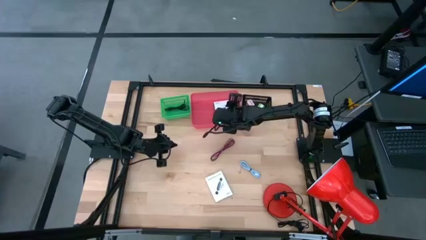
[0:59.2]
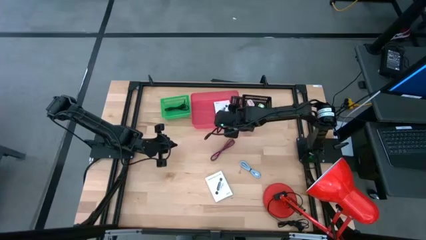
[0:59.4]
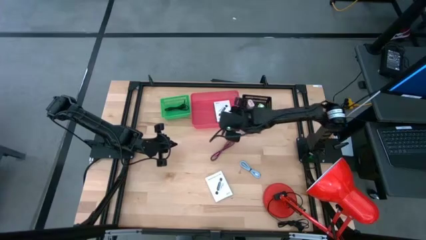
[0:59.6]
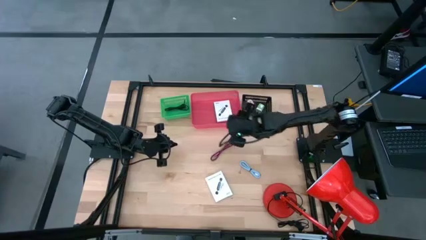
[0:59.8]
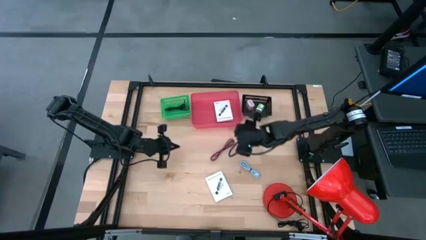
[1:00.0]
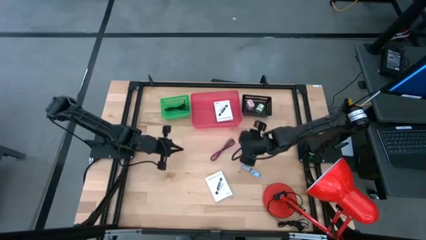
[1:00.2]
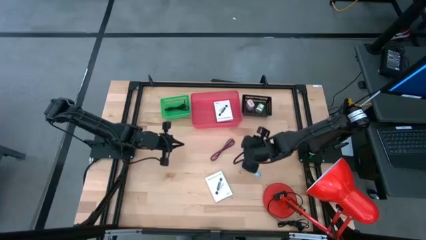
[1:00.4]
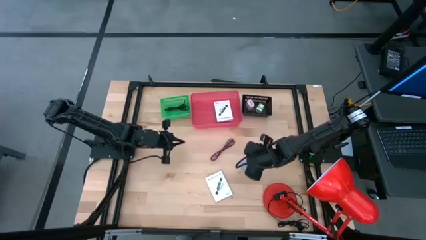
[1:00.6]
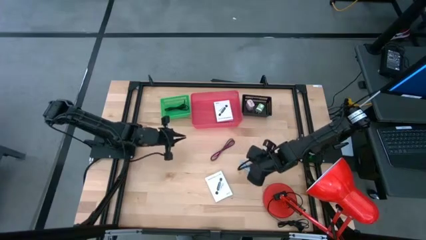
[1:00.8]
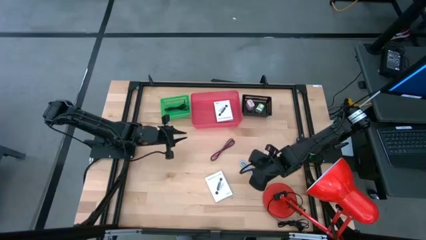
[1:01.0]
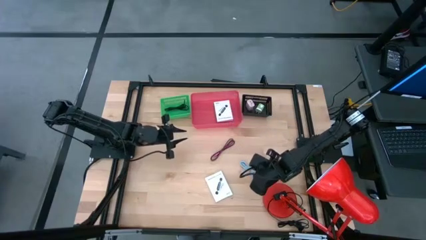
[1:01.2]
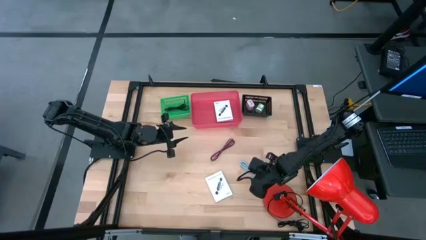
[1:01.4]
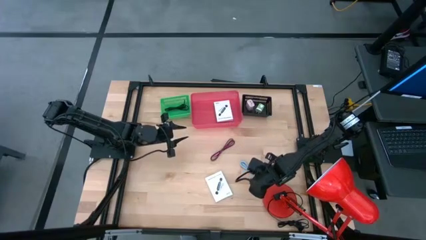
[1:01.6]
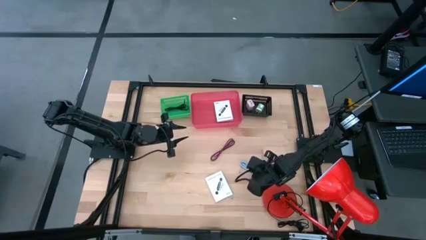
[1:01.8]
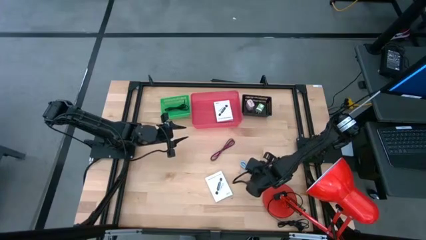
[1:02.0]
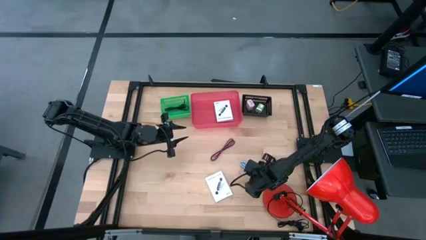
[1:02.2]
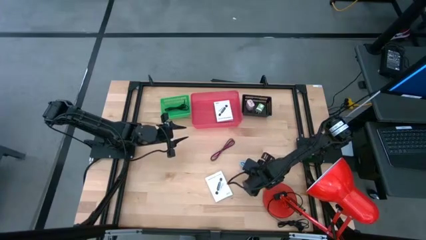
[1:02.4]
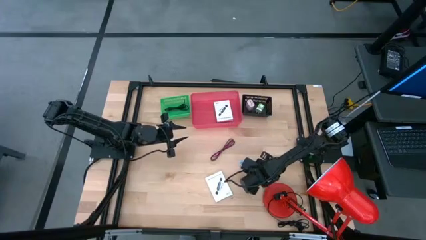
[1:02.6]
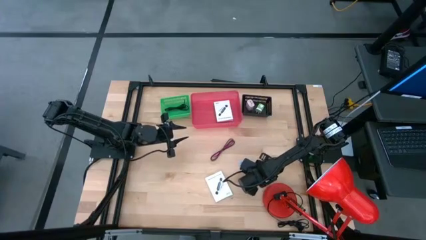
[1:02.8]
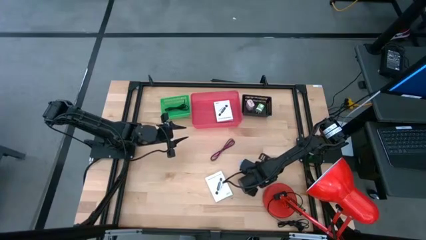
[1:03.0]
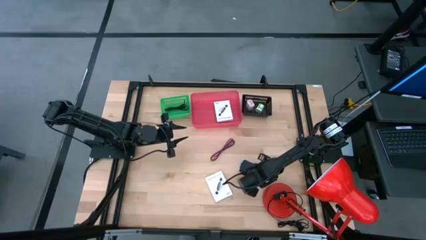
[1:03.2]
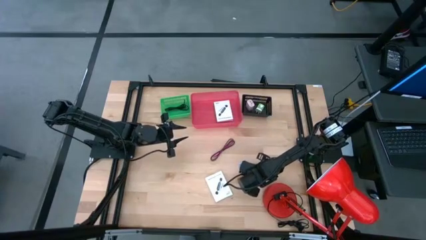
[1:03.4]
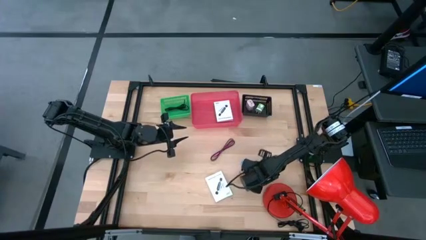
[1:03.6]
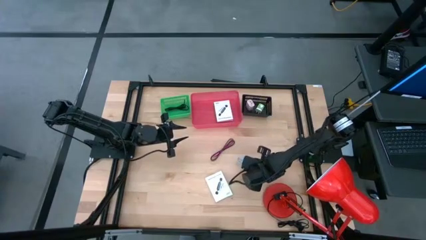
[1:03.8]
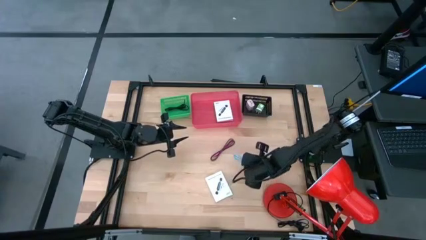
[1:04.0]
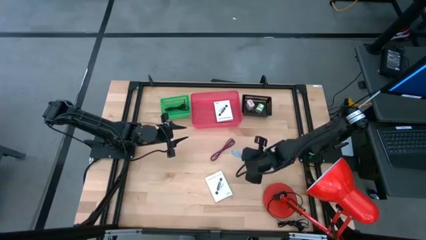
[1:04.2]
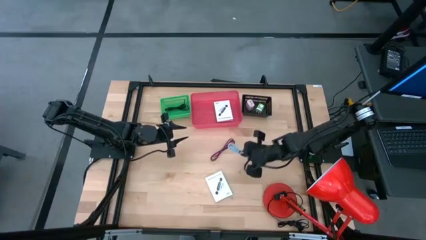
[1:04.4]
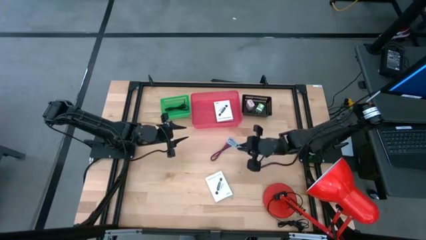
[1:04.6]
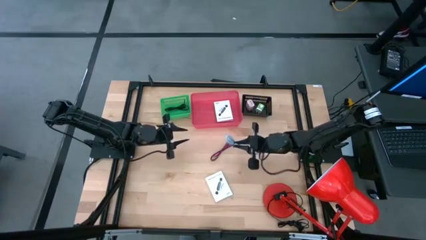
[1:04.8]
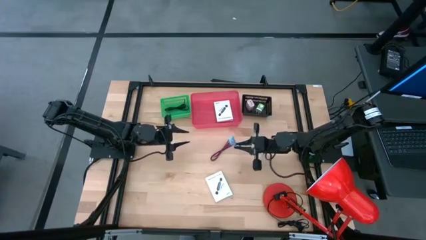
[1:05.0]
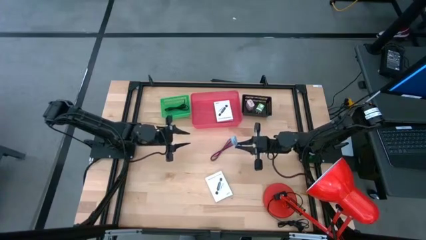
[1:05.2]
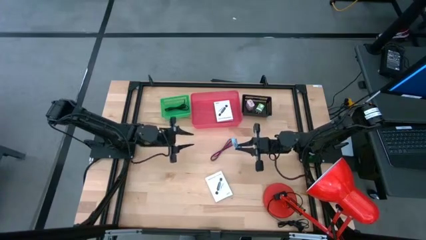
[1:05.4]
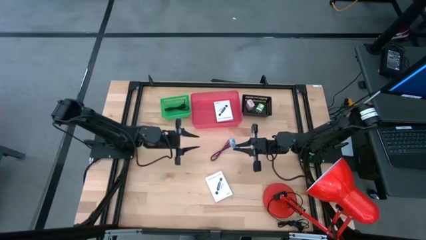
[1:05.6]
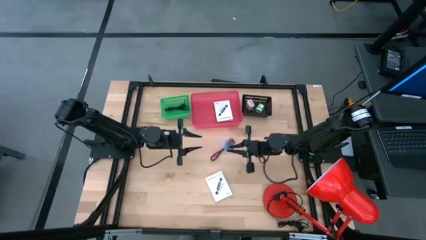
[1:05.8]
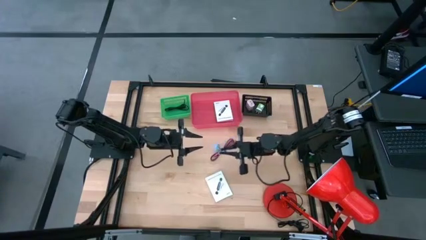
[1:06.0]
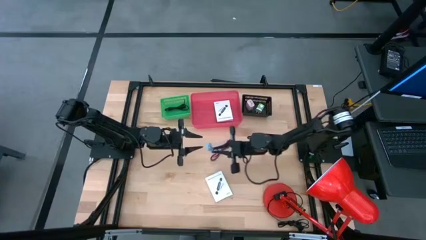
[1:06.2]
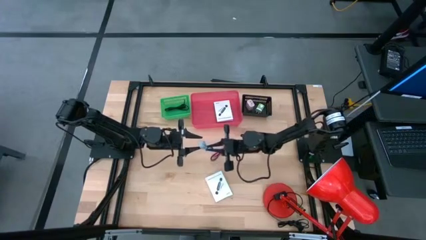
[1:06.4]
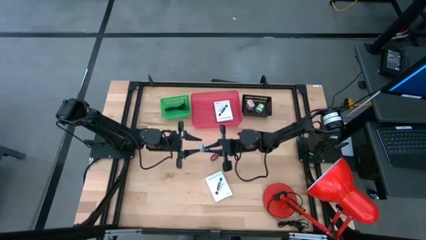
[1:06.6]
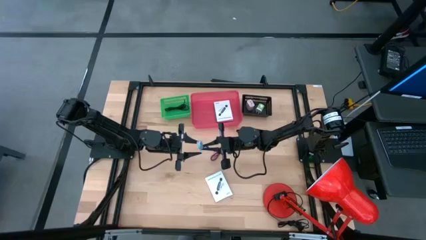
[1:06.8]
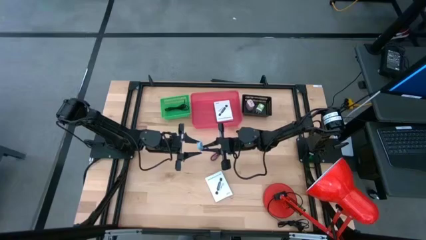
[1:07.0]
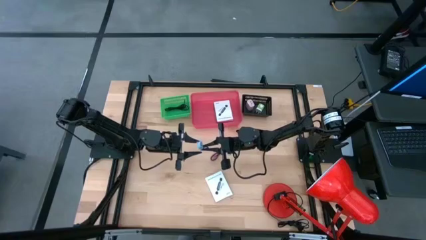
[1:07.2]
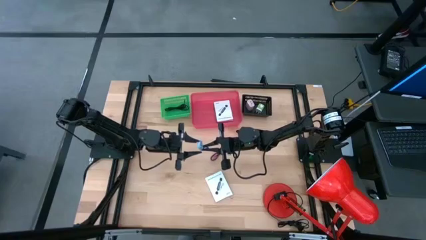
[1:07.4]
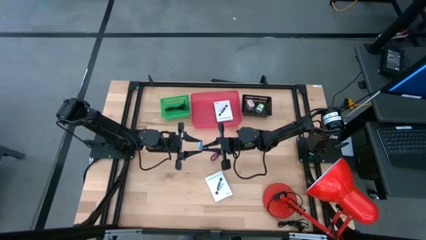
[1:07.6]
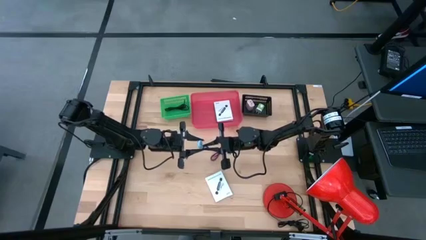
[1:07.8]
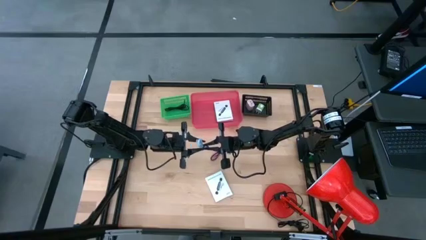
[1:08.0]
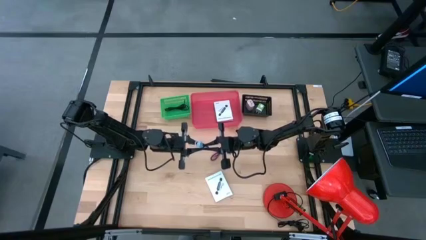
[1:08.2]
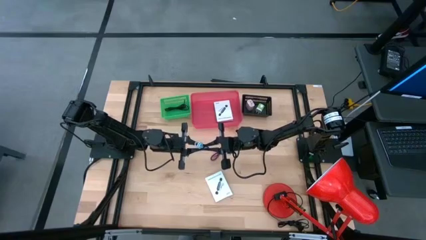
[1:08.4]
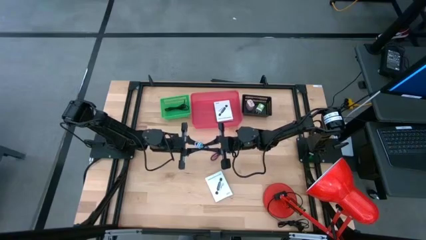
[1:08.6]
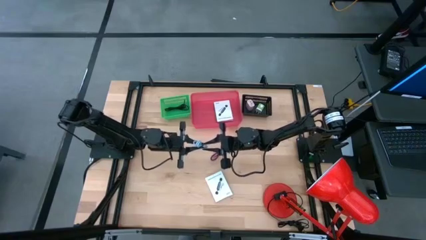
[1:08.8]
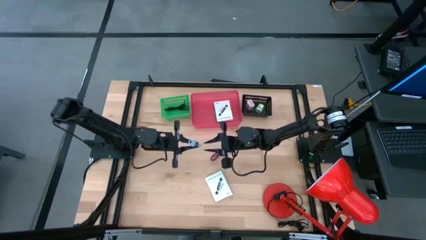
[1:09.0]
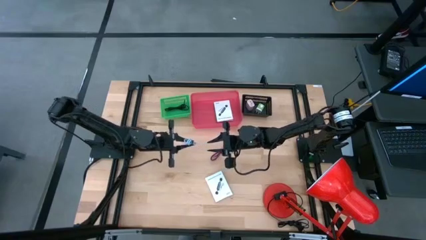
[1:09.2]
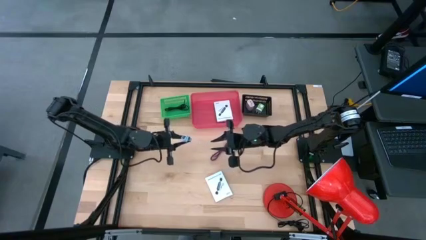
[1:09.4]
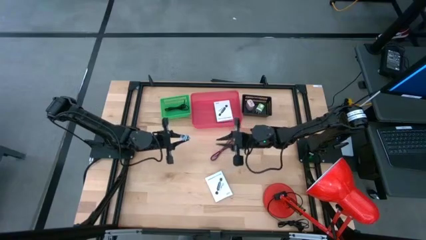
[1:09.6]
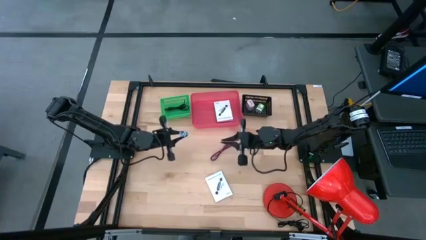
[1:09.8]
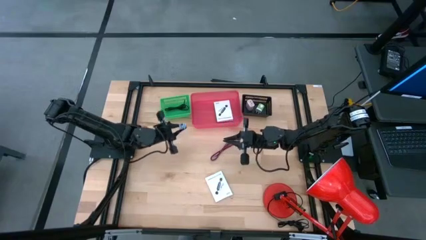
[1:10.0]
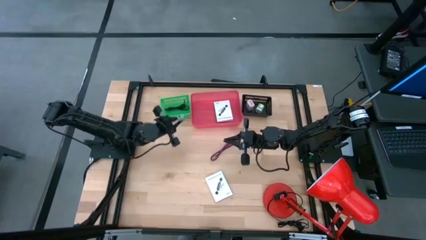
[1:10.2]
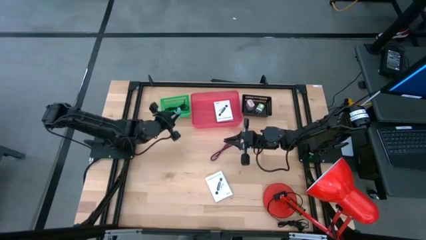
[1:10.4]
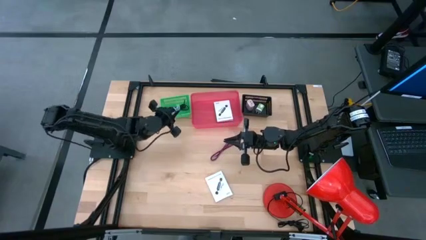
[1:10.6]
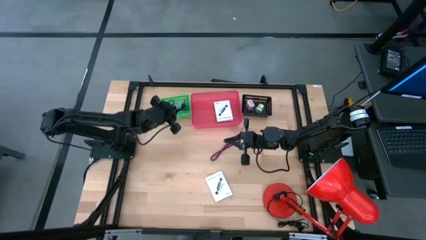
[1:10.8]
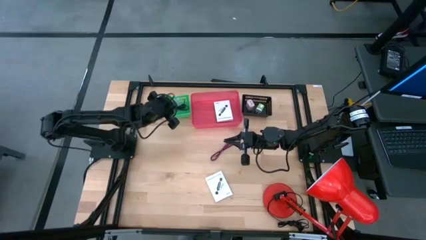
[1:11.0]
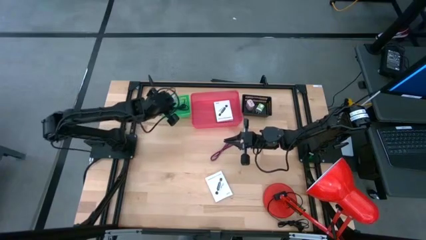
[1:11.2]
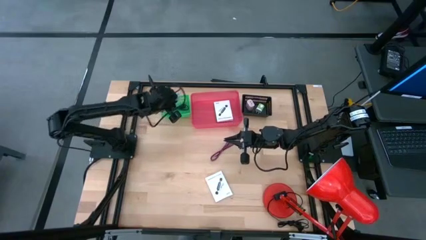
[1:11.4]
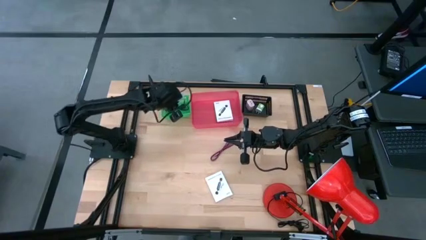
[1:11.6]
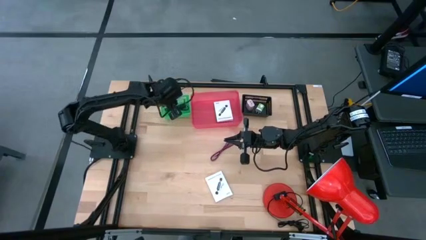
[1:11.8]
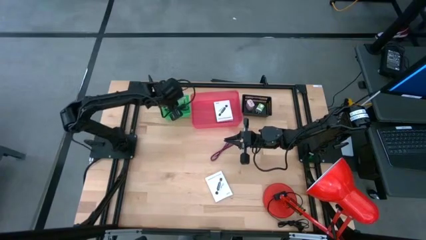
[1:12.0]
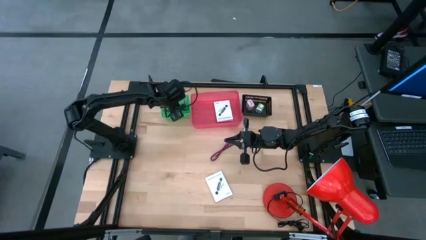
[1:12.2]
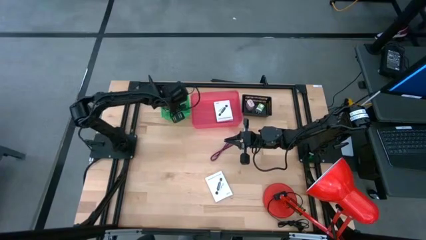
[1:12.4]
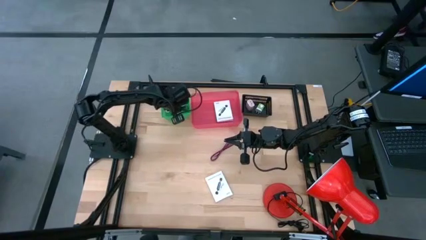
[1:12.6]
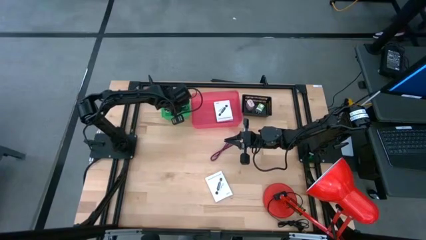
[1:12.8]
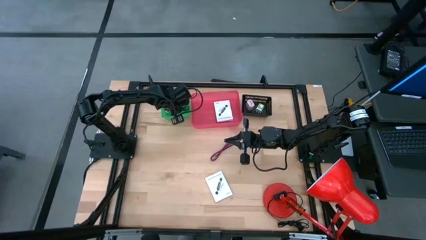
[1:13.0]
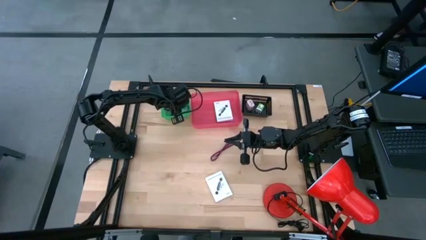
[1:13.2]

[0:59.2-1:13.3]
Task: Pick and place items into bin
Put the light blue charger cable into the green bin
